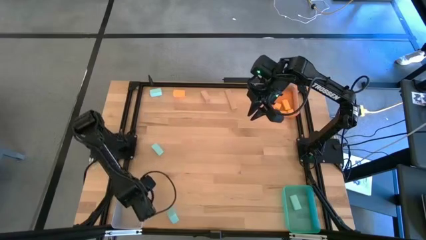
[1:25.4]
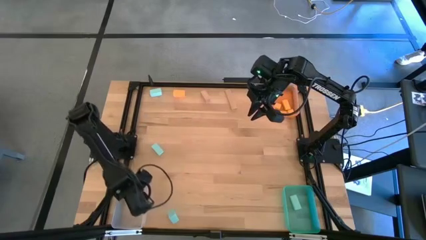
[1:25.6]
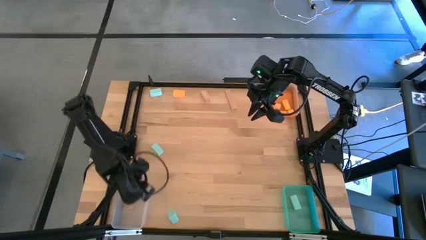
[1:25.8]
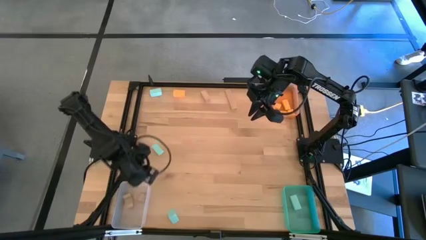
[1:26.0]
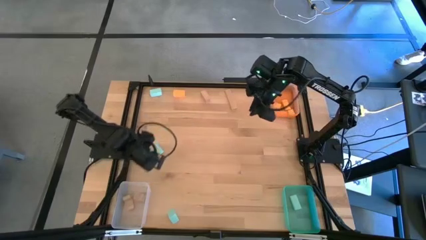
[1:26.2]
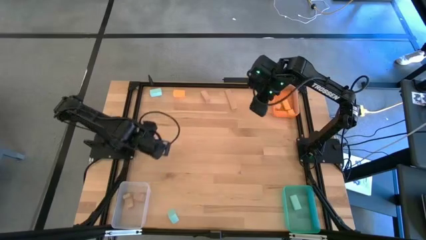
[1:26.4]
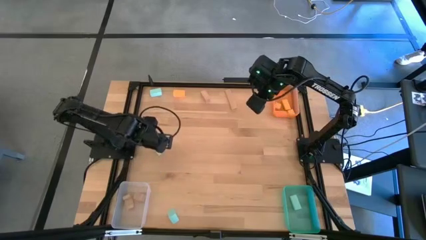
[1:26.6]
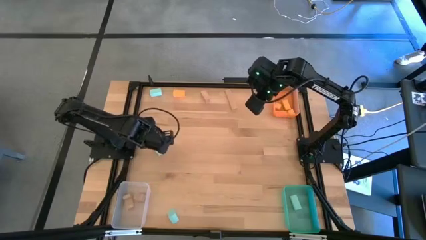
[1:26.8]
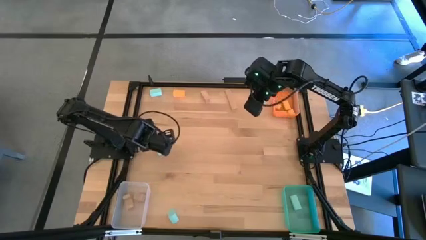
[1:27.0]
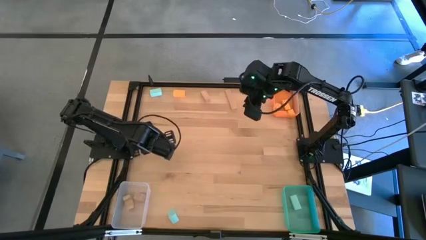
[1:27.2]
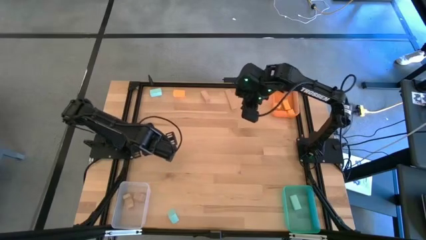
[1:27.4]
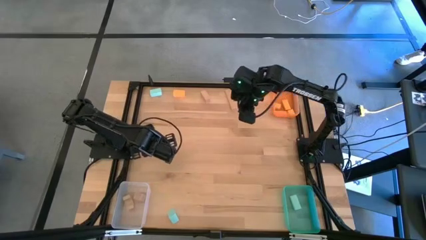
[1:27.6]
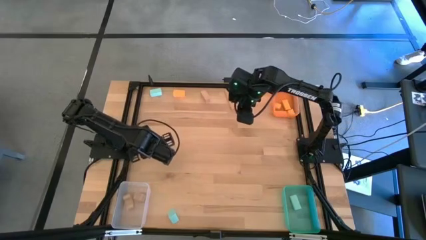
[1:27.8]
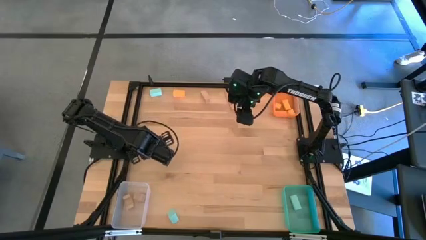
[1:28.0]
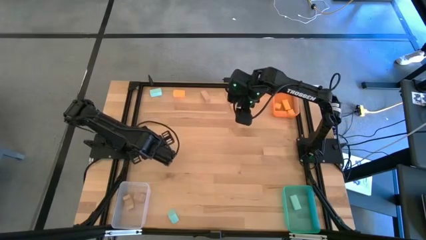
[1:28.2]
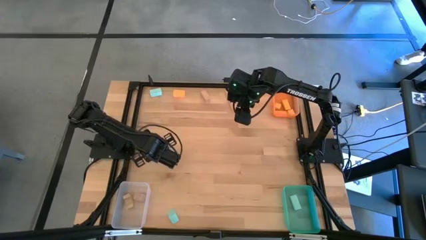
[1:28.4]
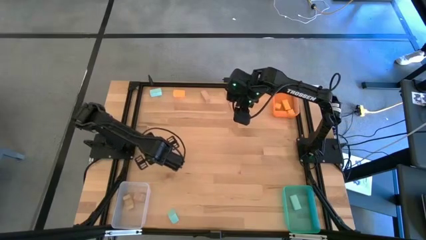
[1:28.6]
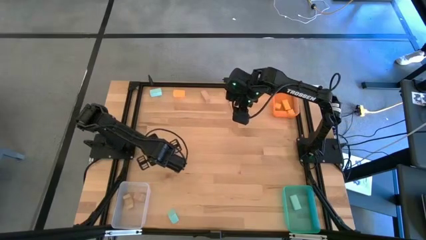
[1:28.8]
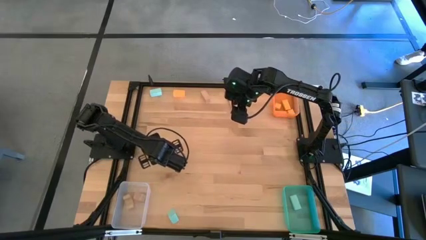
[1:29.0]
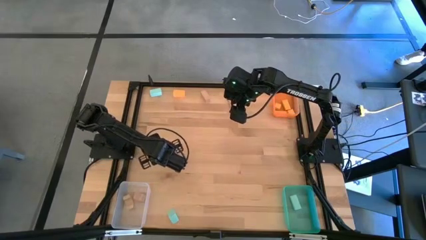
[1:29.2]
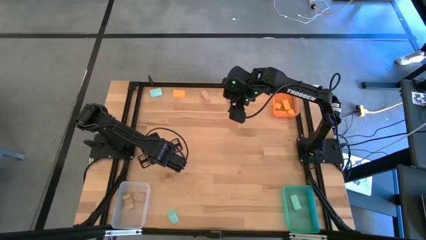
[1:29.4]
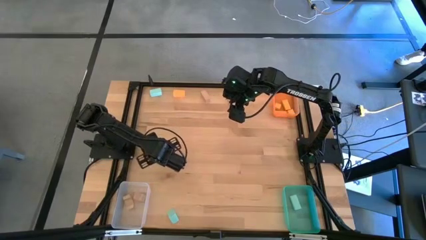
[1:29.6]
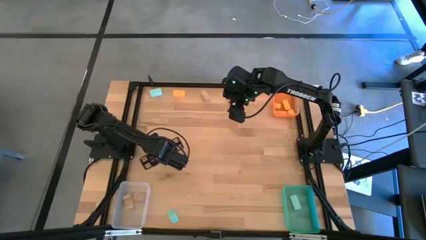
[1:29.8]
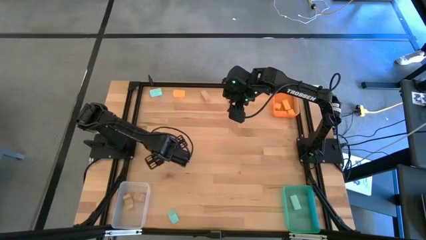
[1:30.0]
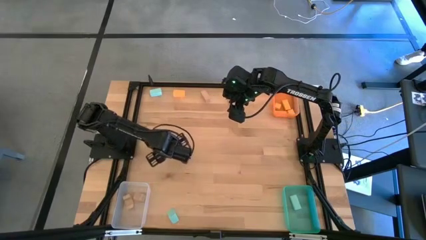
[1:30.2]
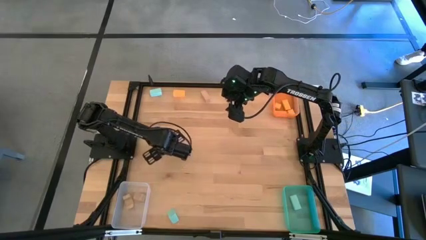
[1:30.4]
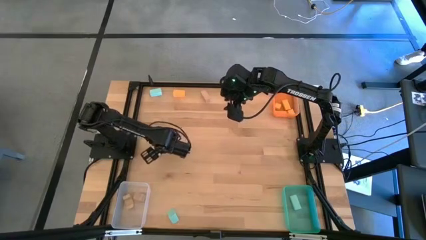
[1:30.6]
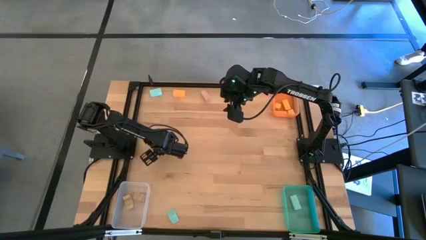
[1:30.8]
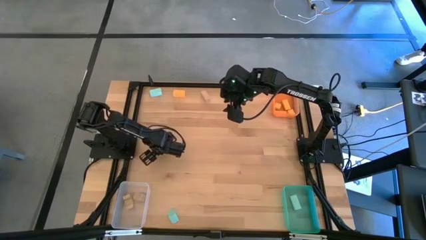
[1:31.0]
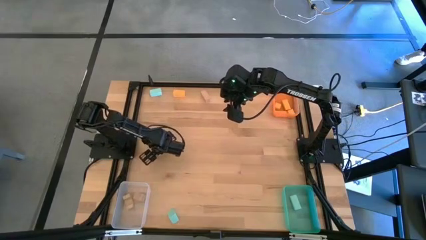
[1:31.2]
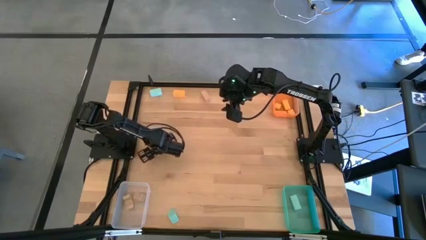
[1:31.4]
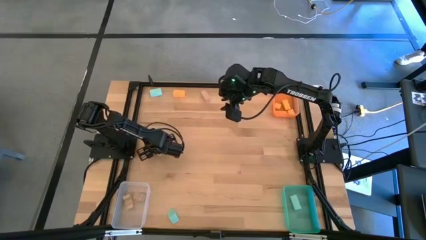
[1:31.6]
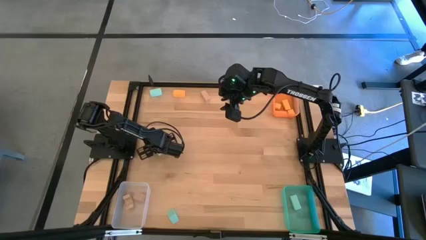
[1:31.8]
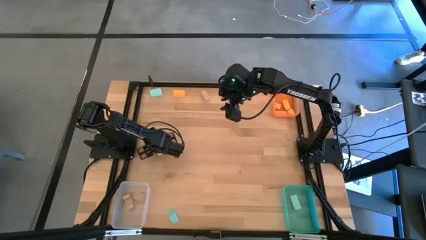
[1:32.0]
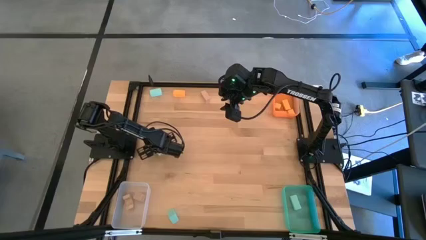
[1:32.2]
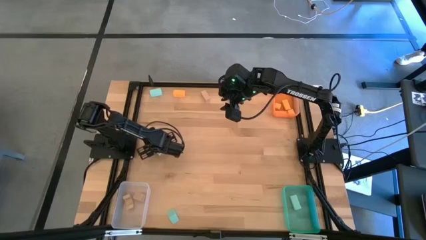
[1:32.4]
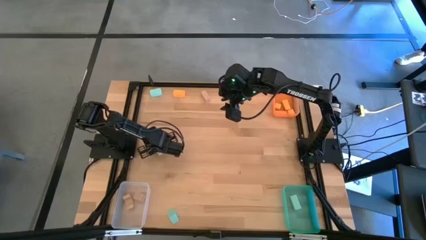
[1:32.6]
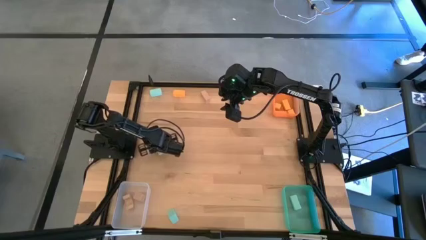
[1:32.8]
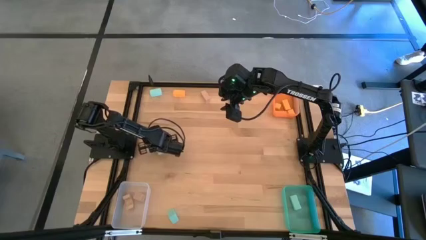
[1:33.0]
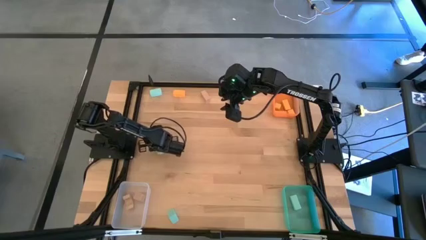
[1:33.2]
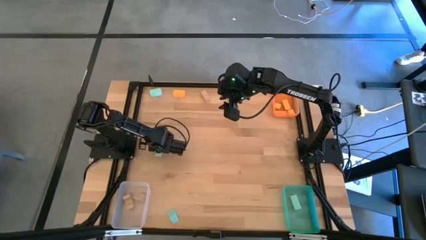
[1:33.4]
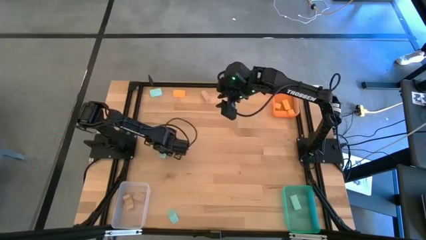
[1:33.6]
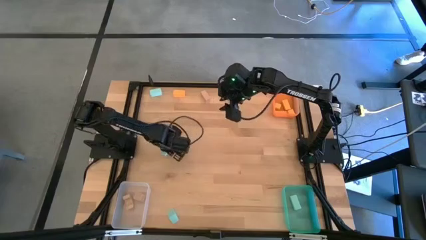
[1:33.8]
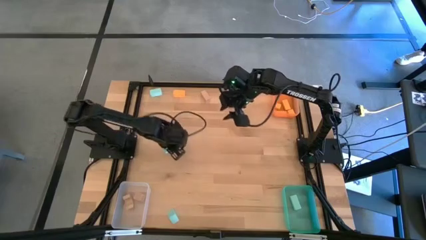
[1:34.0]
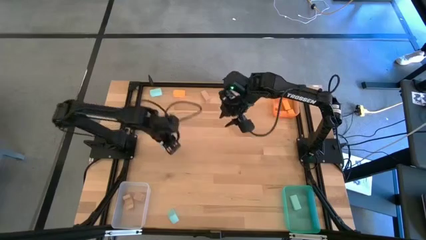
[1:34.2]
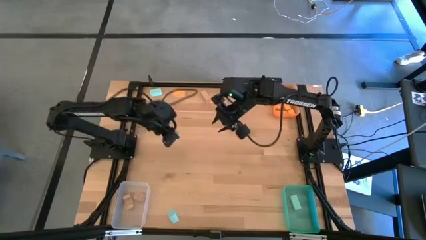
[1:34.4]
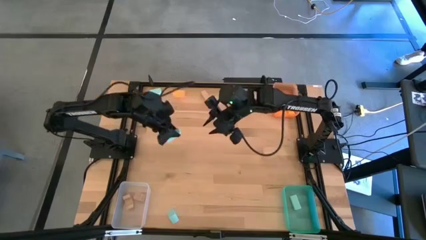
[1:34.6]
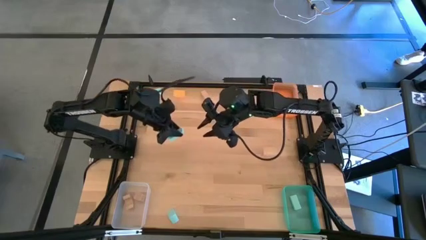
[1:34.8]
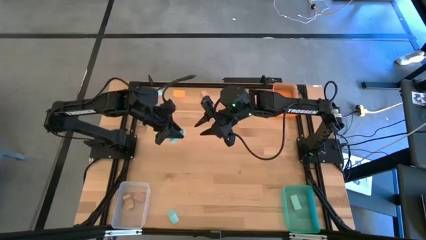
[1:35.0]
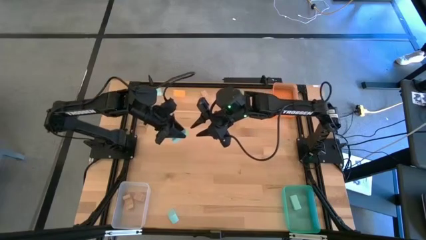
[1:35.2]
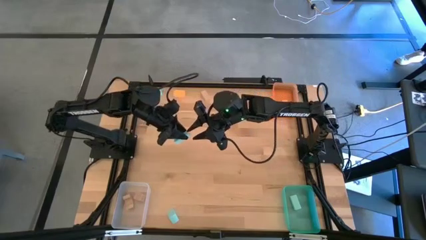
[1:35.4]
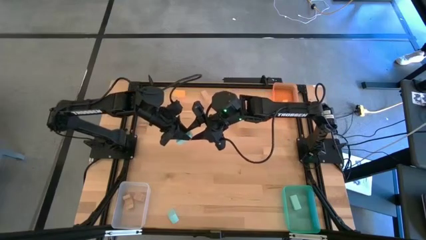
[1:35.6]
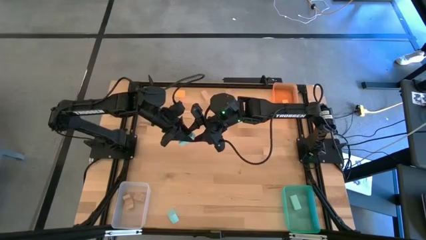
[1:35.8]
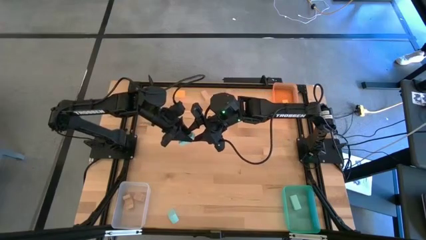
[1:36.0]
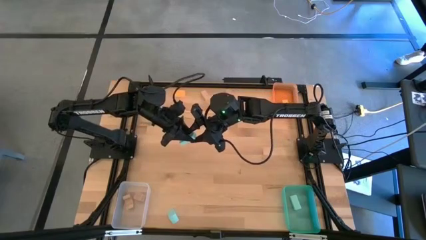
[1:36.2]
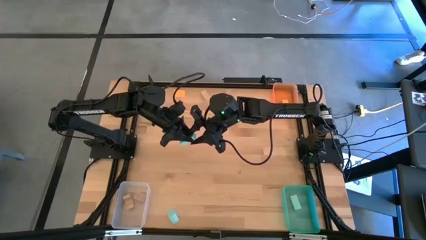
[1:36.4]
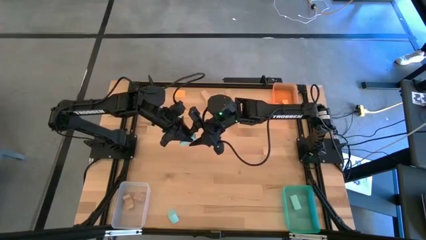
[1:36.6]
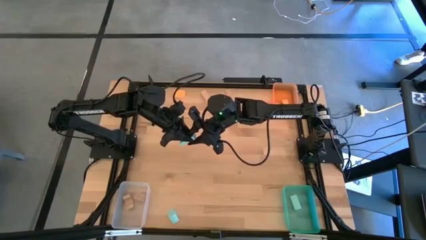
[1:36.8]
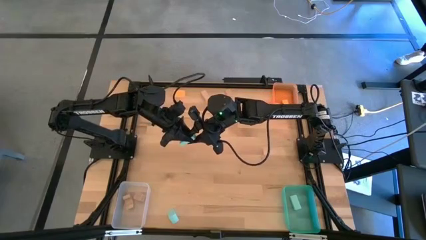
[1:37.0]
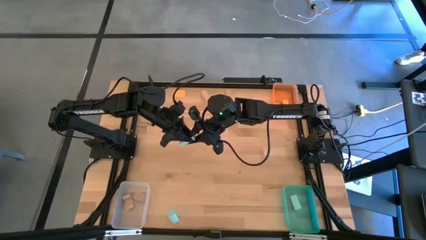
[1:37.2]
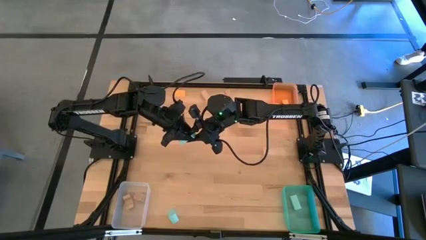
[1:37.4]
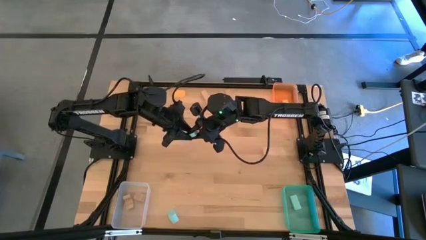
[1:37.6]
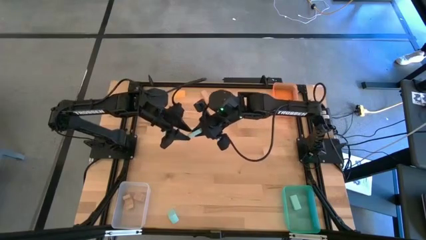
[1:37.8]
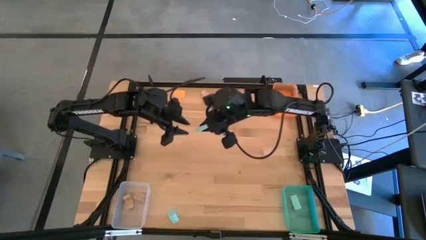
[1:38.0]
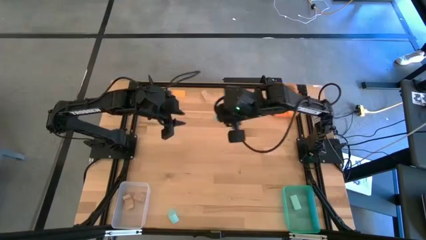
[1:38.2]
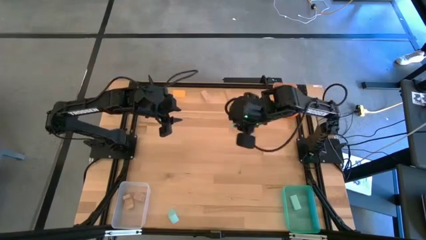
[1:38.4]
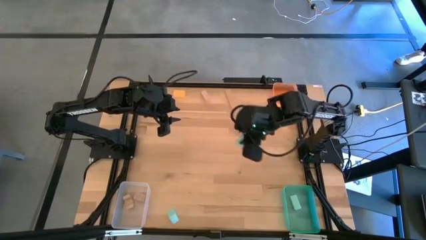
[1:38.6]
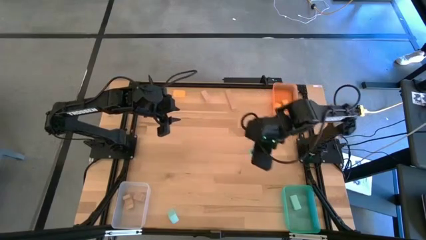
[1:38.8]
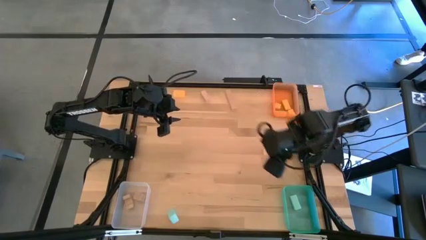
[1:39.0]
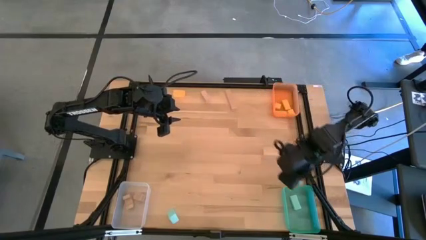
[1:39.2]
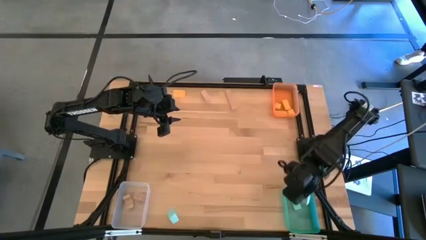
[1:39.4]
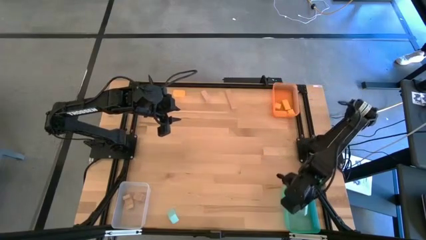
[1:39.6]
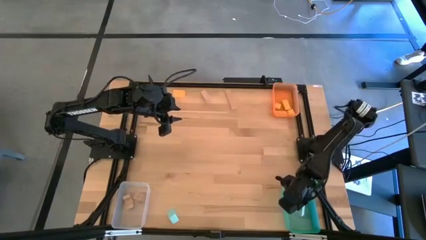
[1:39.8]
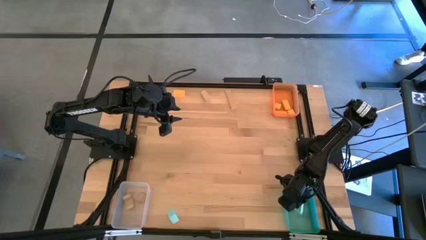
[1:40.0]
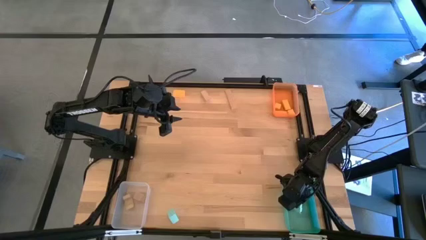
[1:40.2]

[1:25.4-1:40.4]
Task: Sort & place blocks by color
Put the blue block into the green bin

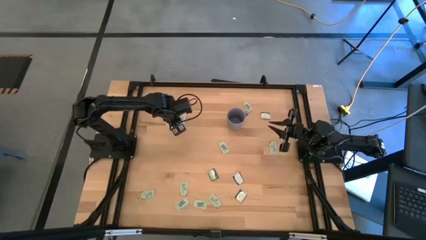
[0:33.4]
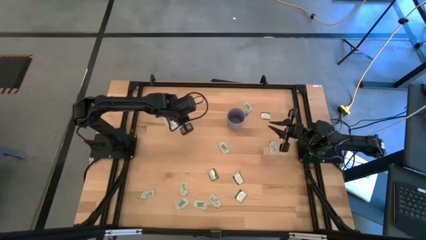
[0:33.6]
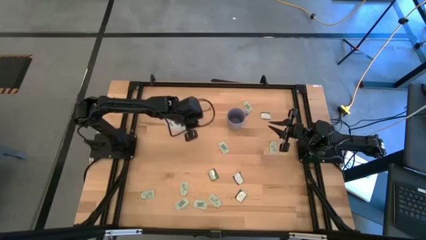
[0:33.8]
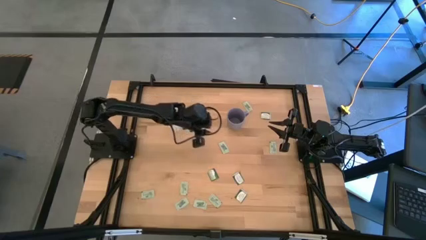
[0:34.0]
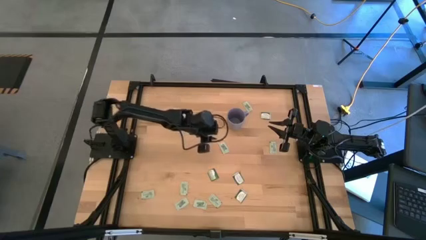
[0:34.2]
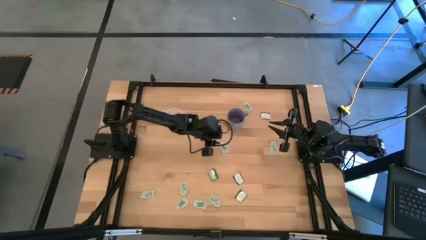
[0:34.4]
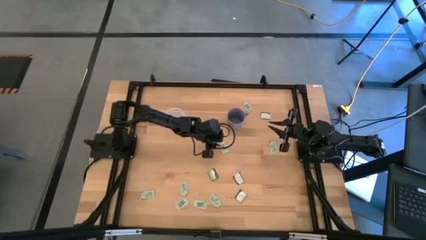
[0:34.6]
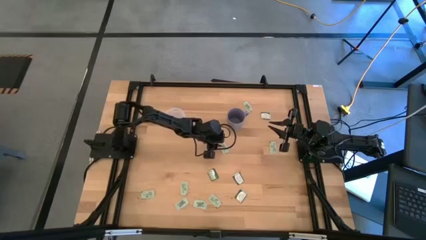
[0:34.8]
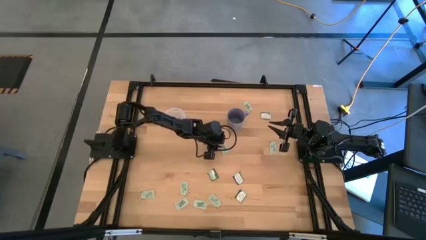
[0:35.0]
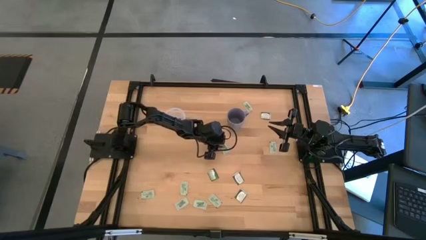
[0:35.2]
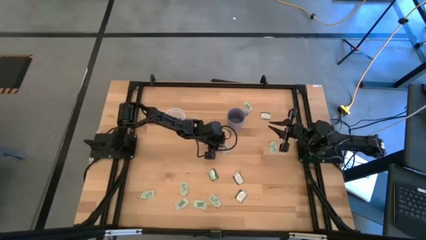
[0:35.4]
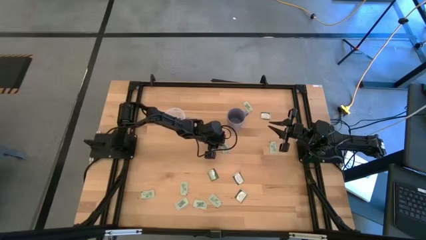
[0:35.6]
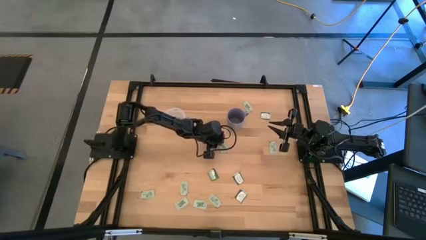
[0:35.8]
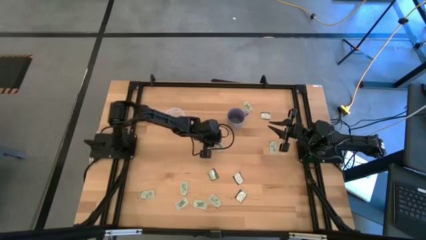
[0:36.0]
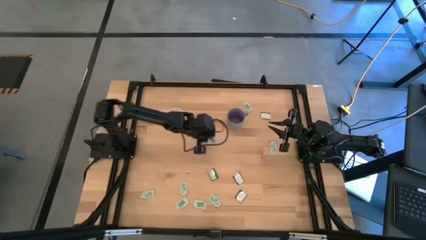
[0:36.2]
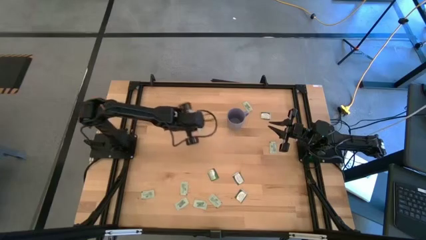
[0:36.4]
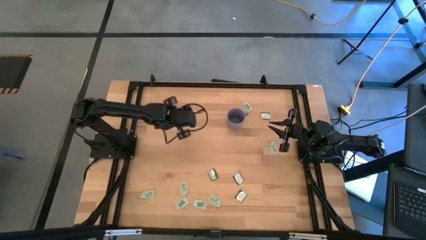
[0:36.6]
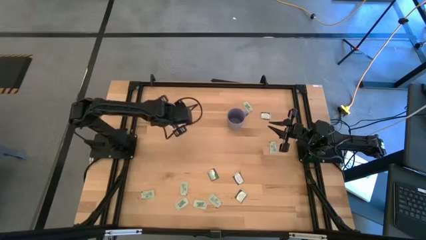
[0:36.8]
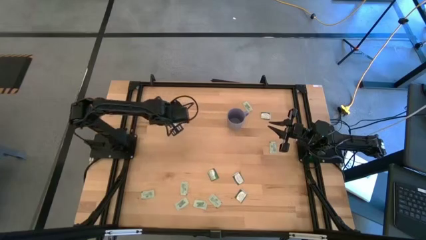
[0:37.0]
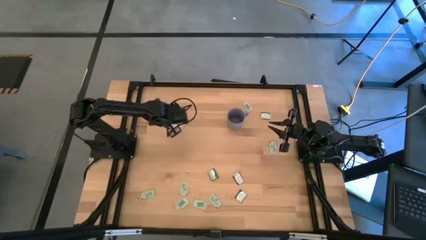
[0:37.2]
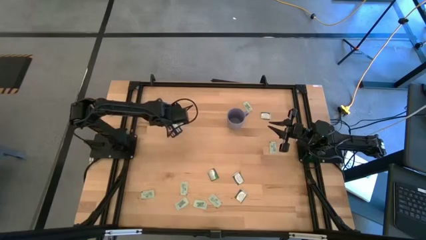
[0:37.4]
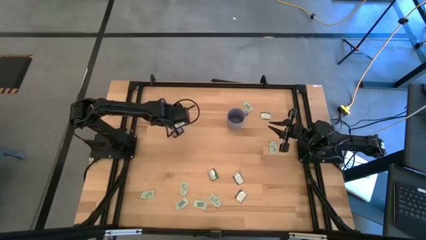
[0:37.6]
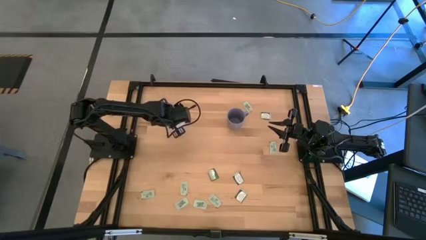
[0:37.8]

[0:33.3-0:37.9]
Task: Pick and place Stevia / Truvia into bins
Put the light green stevia packet into the transparent container
